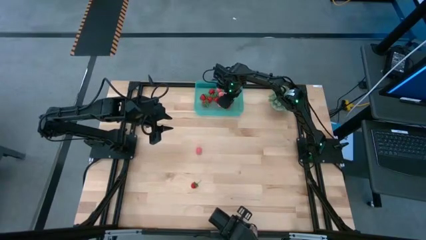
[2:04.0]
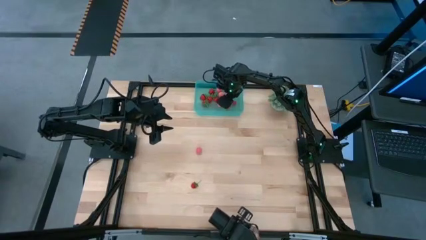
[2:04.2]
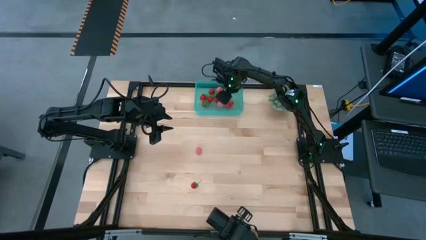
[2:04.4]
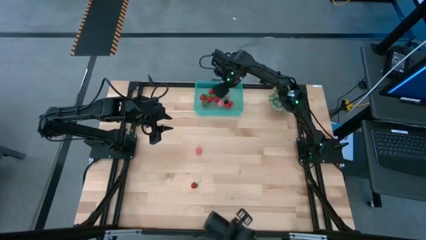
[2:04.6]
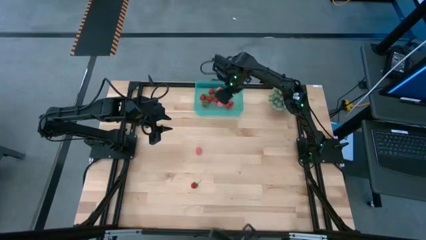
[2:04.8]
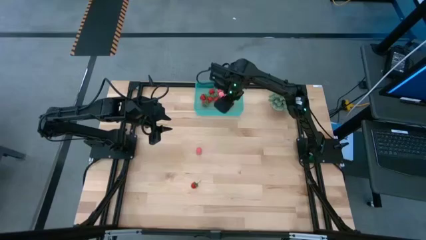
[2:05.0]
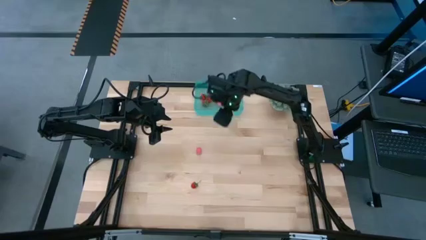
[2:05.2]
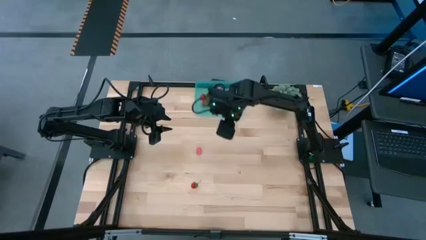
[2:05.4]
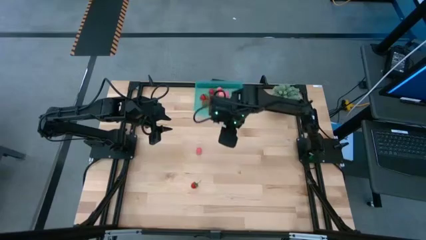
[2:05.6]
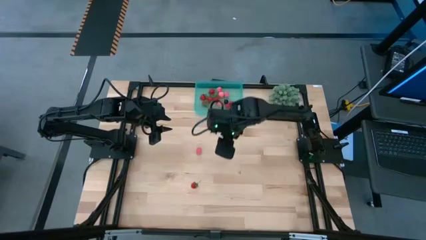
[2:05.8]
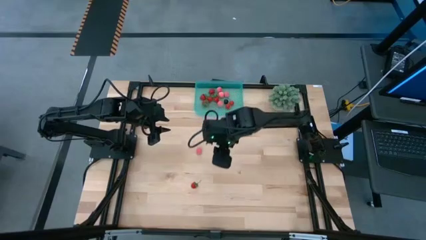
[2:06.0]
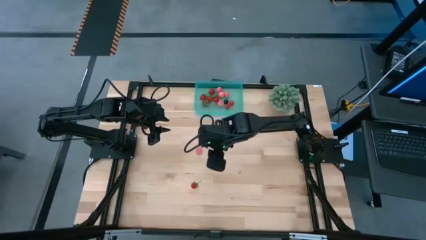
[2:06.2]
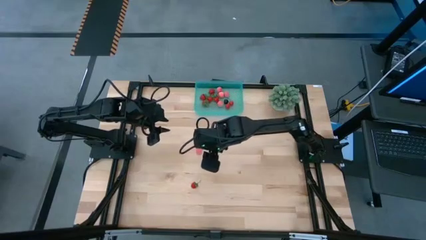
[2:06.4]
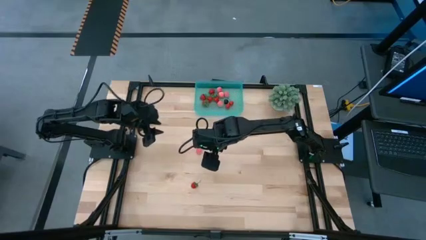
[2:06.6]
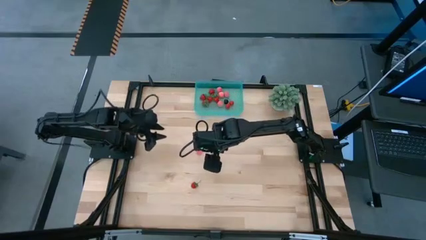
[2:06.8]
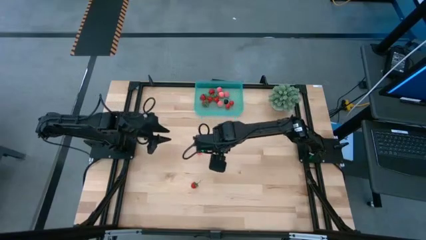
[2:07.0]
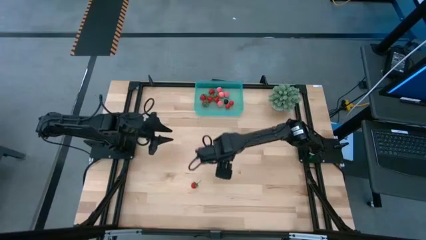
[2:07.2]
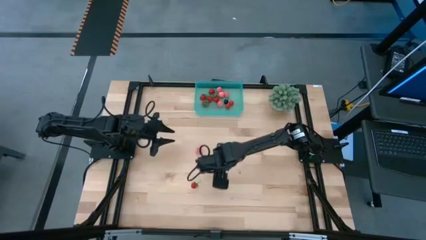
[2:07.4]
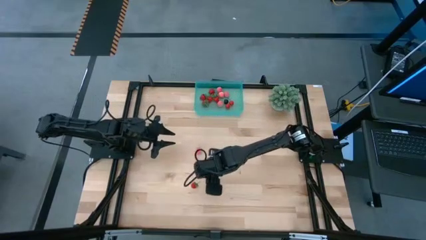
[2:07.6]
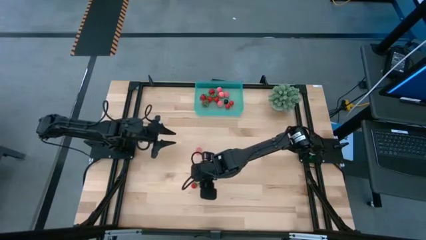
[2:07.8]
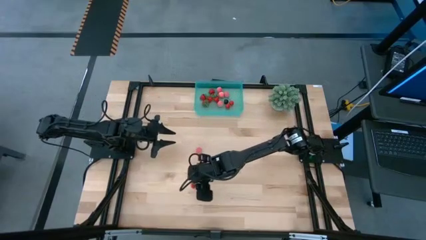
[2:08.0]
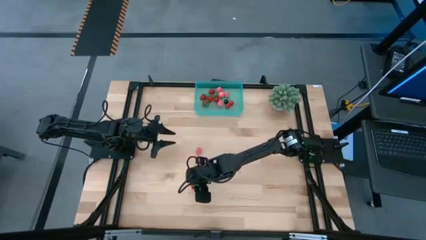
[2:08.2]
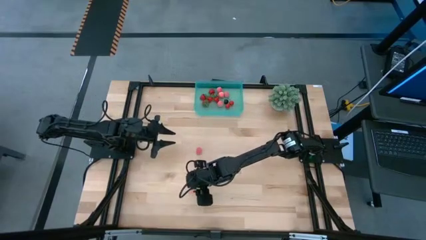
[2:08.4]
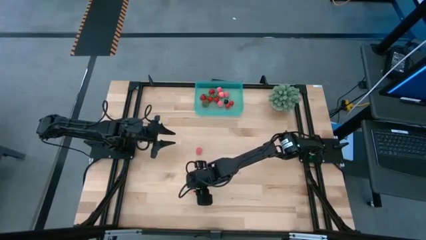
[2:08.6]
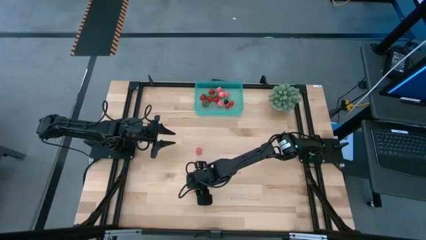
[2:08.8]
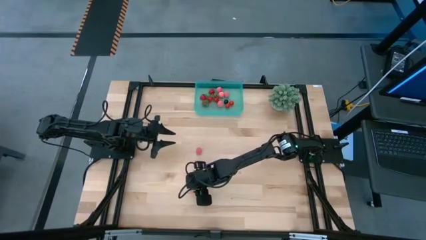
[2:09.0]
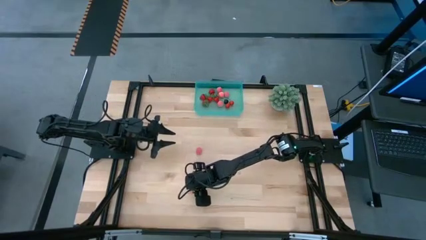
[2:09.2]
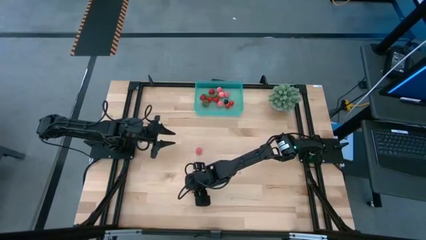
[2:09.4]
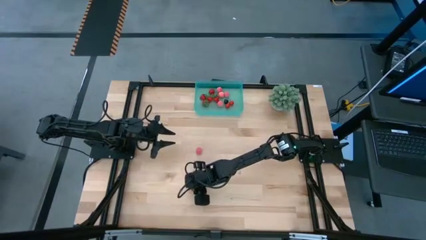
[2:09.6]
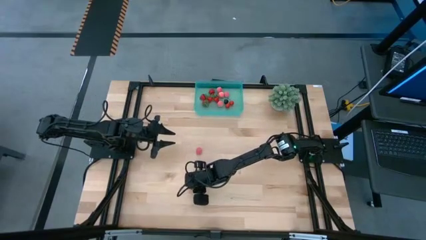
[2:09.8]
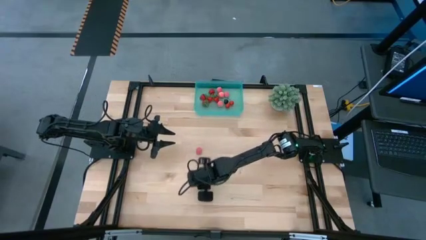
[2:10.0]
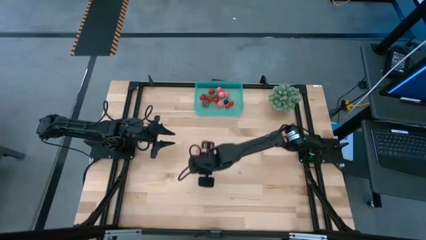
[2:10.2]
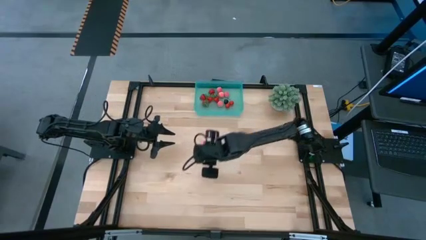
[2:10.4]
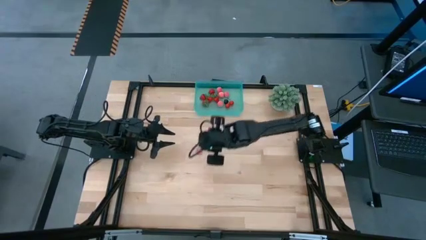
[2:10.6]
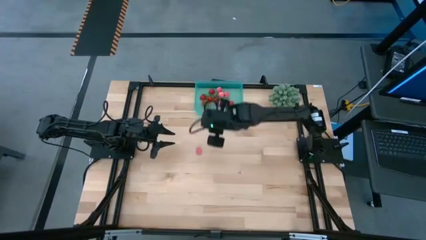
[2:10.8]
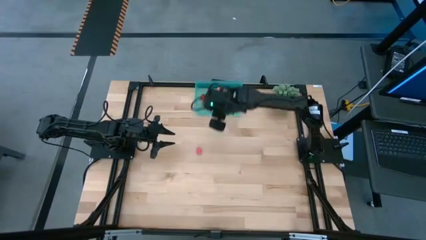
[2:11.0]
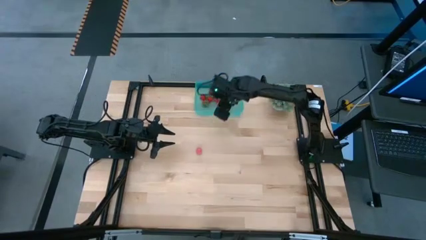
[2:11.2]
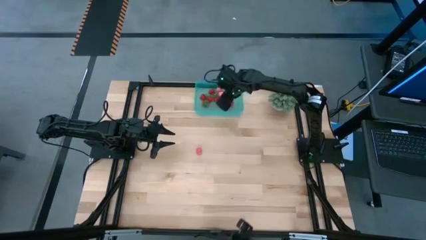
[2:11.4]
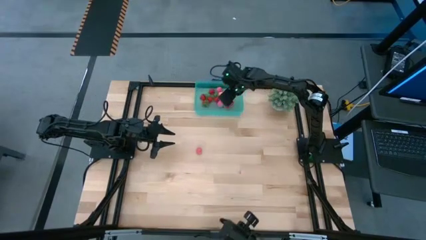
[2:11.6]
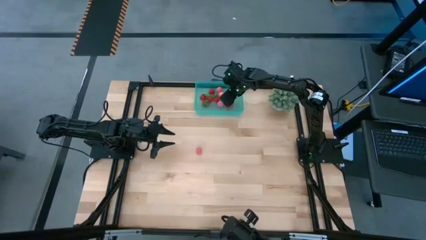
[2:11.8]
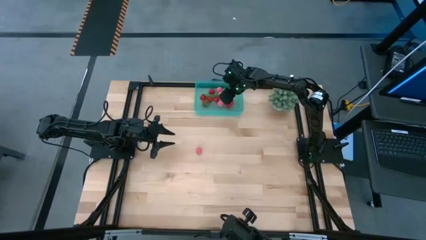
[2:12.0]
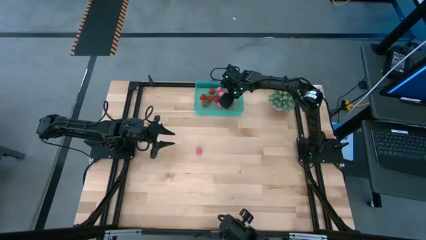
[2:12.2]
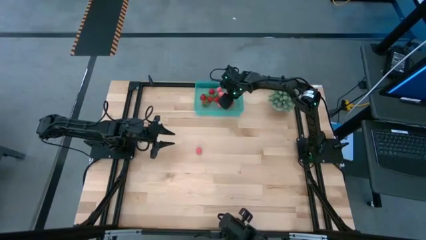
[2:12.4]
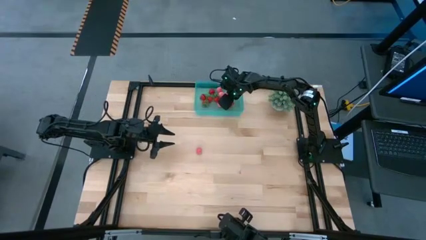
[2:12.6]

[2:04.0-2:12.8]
Task: Pick and placing Produce into tupperware
Put the strawberry into the blue basket

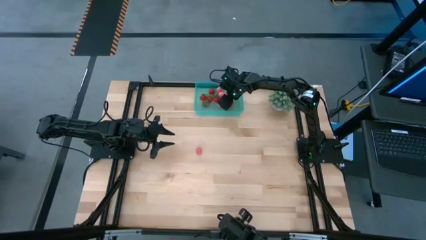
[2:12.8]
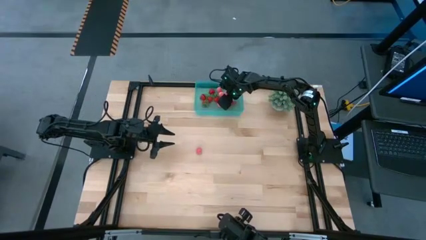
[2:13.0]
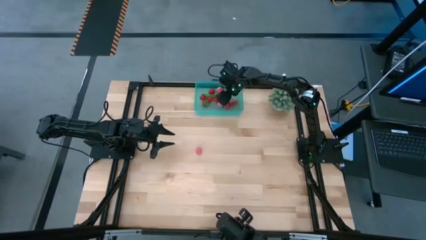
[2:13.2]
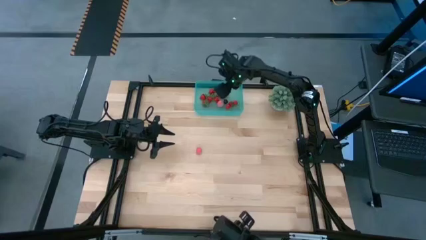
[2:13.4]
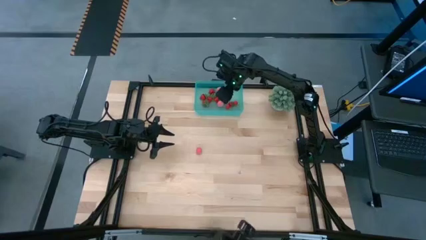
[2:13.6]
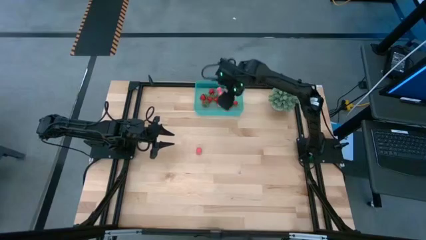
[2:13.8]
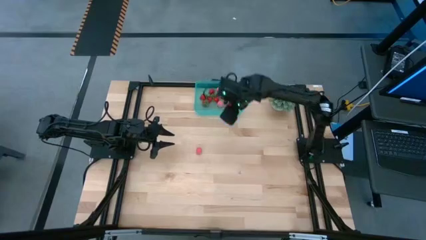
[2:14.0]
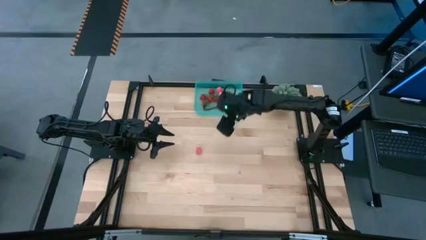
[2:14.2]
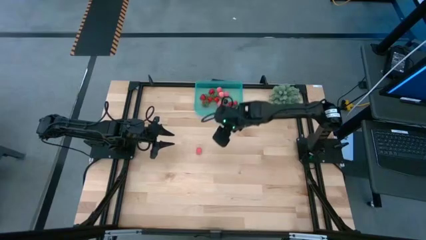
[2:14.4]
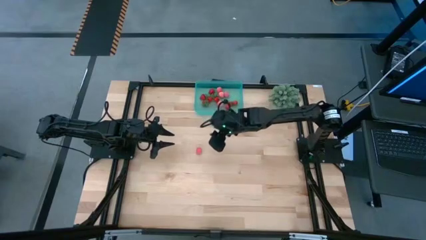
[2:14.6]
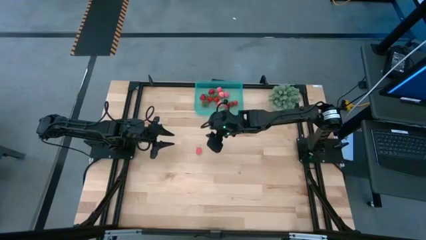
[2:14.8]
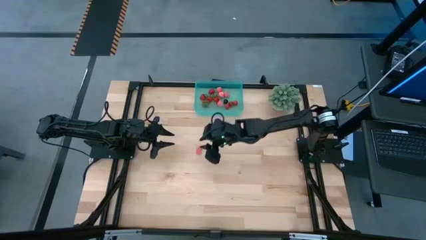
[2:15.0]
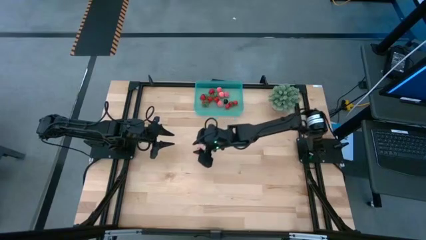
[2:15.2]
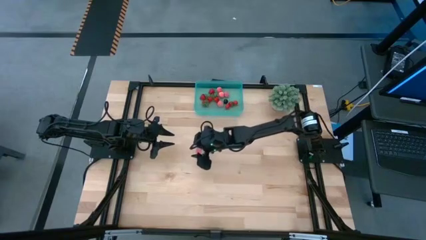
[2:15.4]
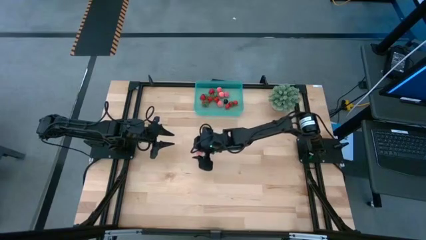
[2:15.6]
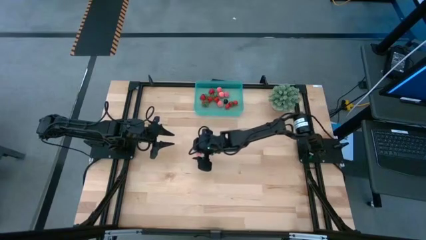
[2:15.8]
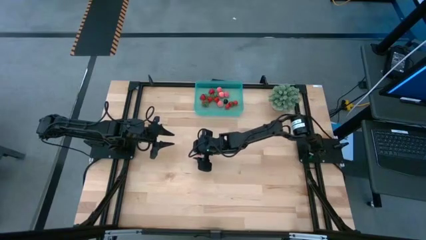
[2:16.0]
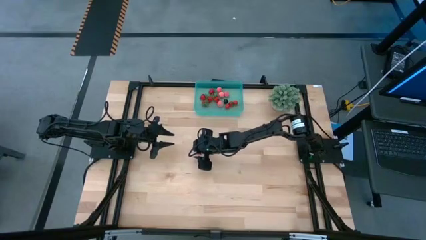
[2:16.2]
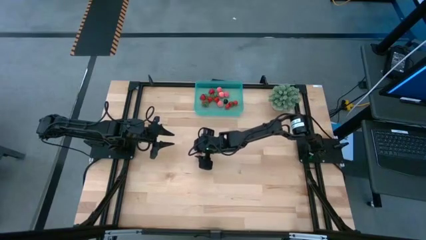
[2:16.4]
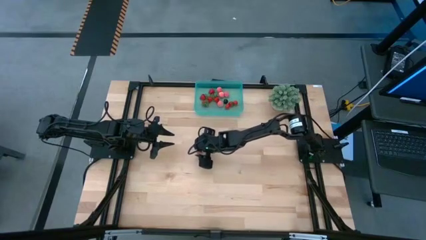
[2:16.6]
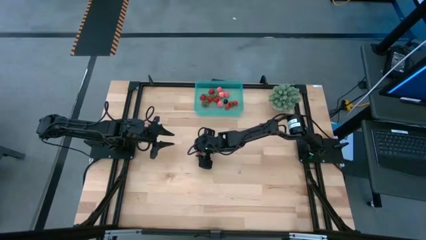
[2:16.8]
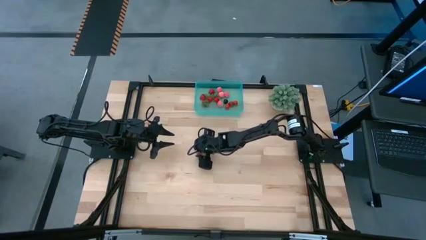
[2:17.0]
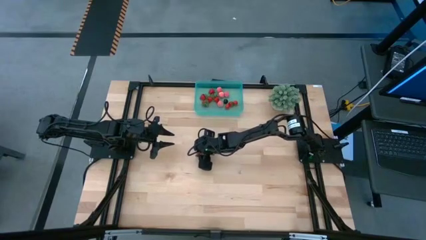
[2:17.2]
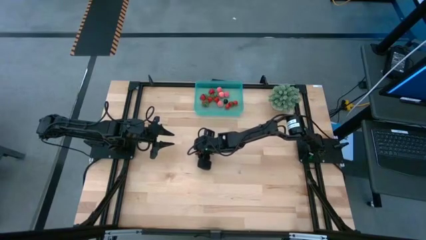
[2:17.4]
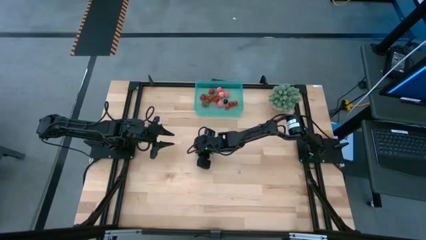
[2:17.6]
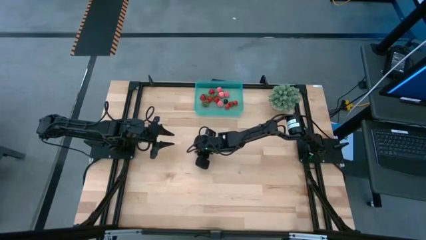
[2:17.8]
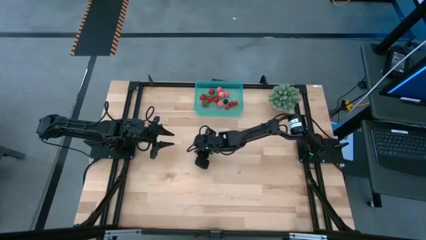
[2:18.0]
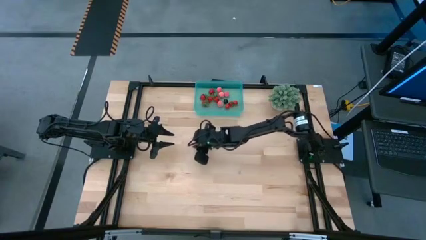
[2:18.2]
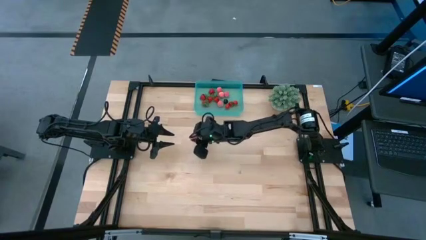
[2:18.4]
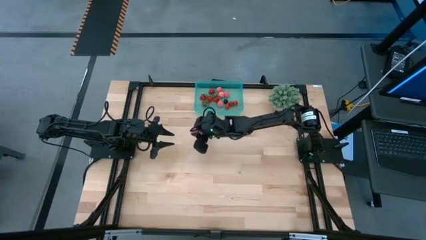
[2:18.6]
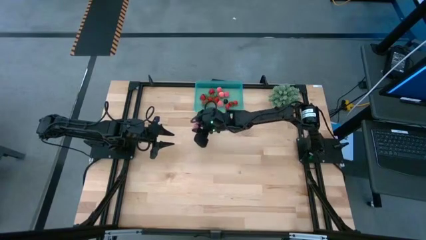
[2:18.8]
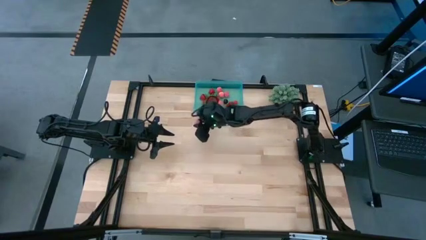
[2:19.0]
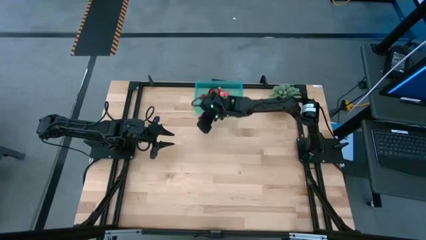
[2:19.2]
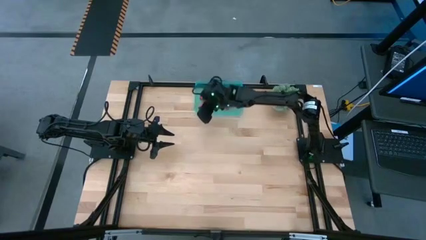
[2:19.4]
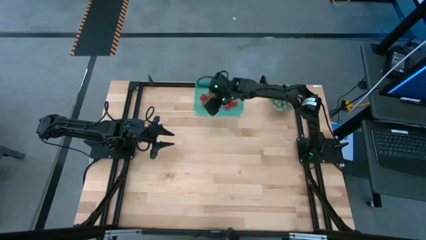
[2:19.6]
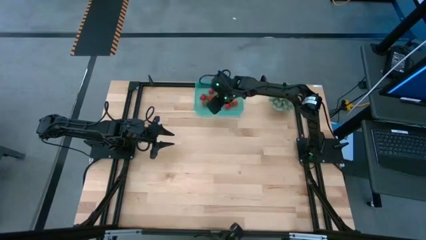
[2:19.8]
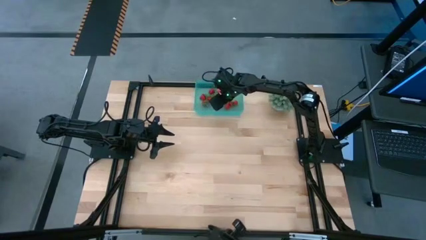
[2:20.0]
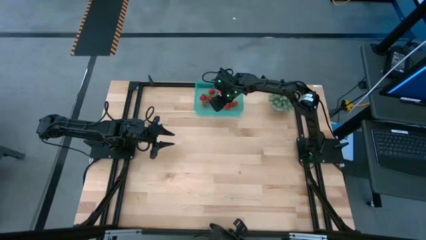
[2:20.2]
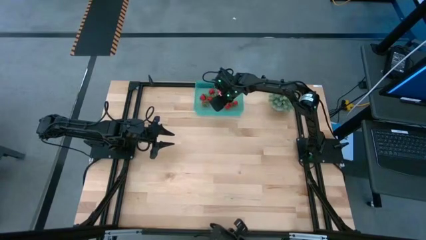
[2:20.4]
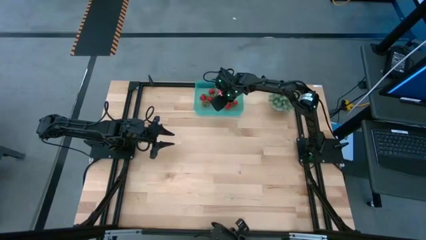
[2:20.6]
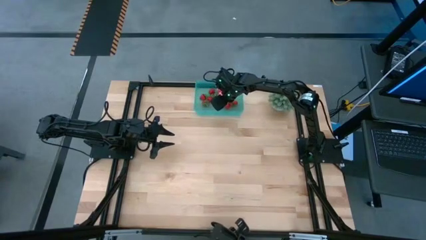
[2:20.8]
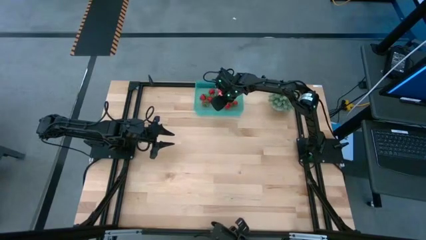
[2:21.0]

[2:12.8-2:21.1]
Put the apricot into the blue basket
